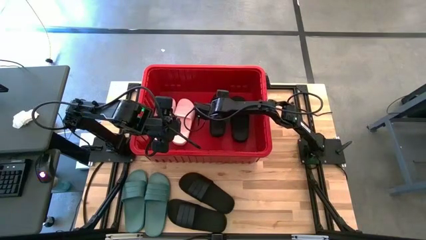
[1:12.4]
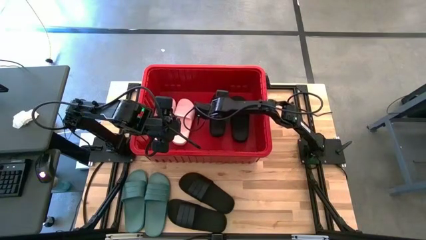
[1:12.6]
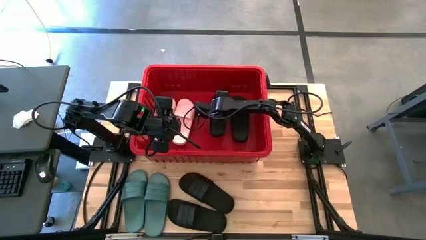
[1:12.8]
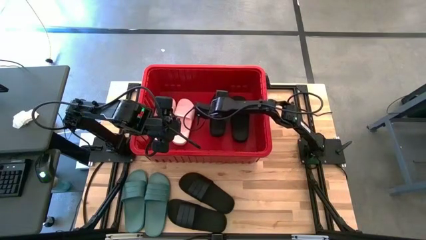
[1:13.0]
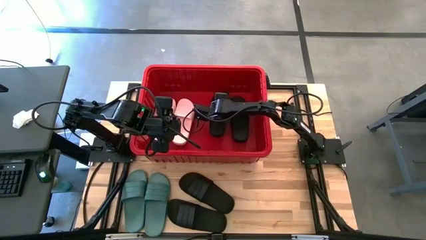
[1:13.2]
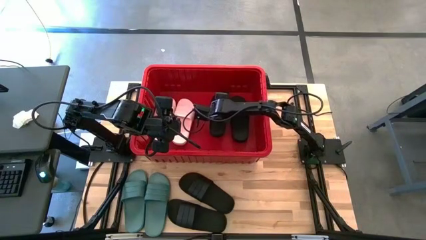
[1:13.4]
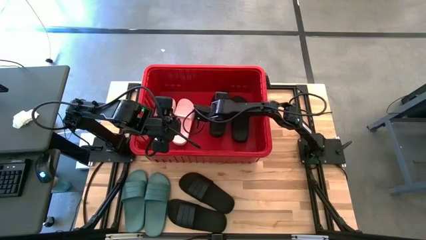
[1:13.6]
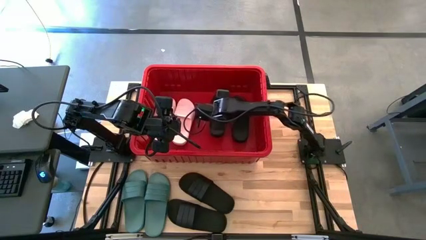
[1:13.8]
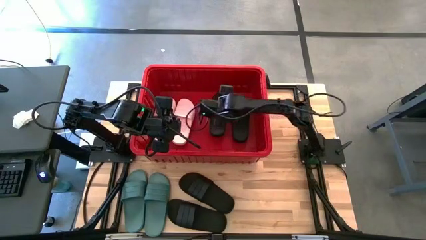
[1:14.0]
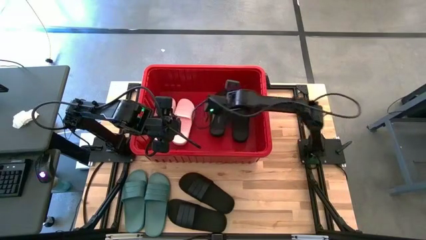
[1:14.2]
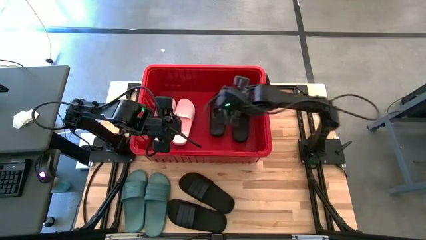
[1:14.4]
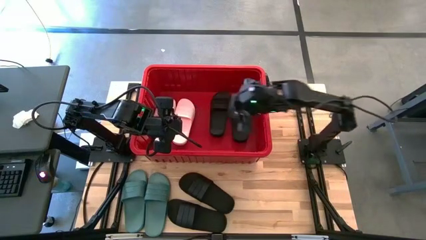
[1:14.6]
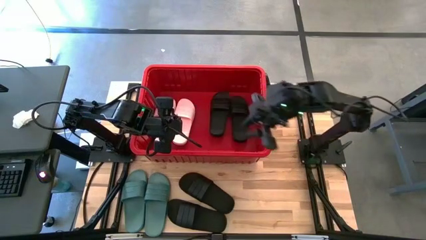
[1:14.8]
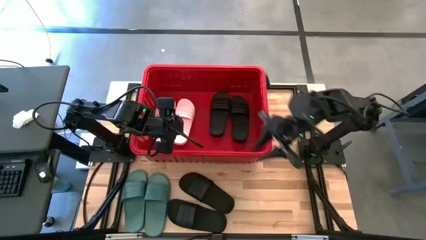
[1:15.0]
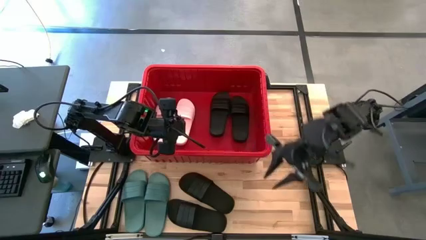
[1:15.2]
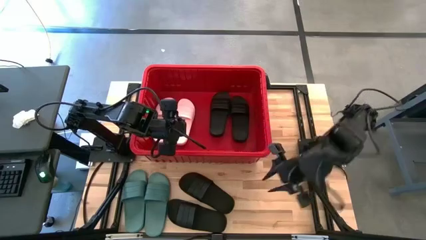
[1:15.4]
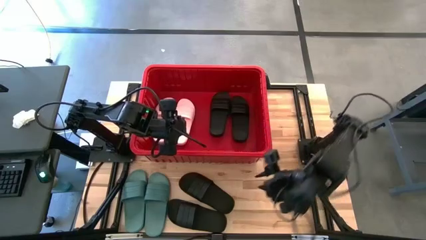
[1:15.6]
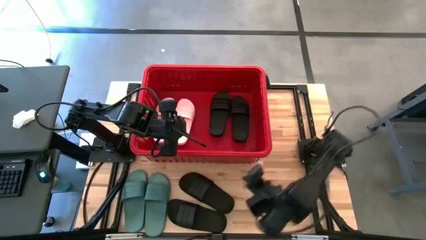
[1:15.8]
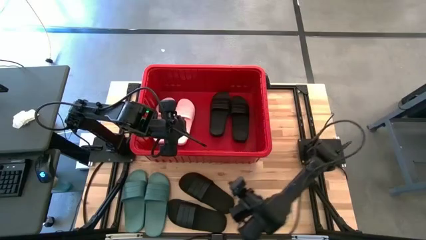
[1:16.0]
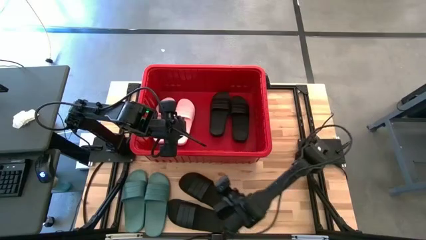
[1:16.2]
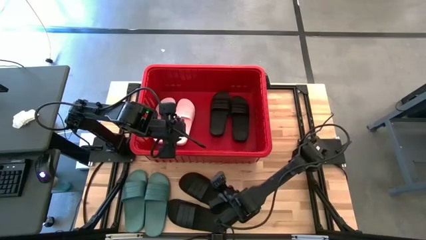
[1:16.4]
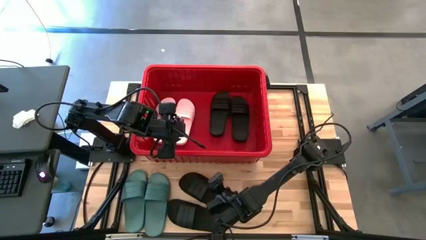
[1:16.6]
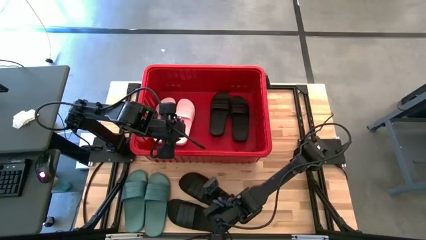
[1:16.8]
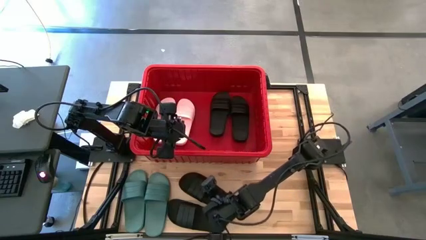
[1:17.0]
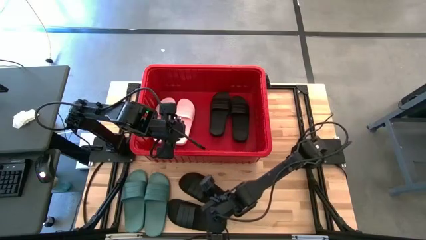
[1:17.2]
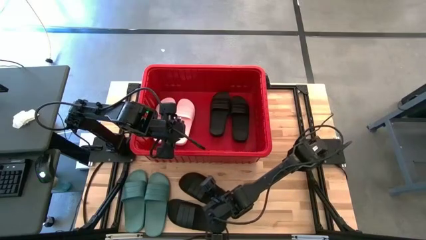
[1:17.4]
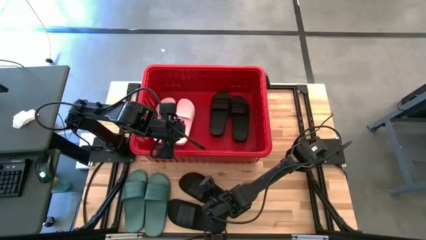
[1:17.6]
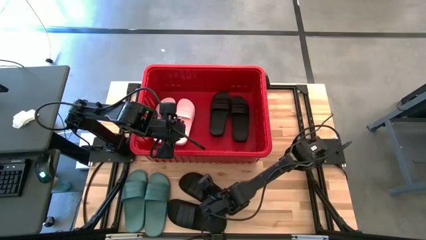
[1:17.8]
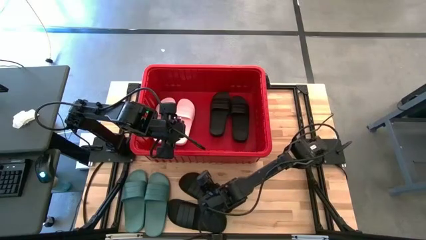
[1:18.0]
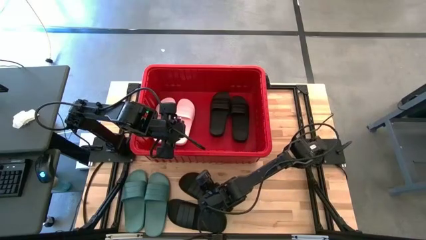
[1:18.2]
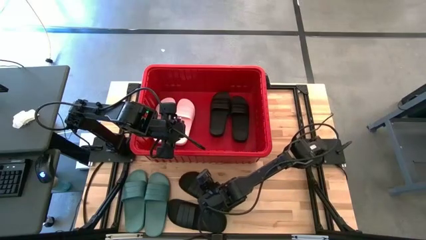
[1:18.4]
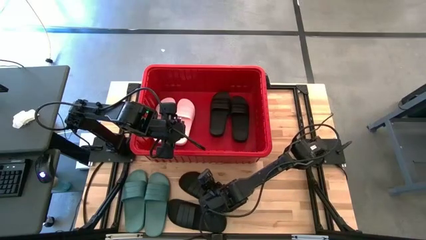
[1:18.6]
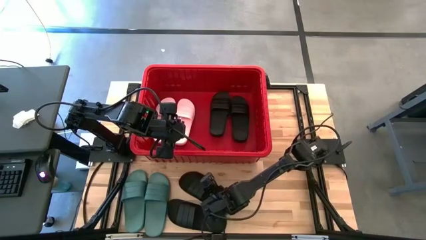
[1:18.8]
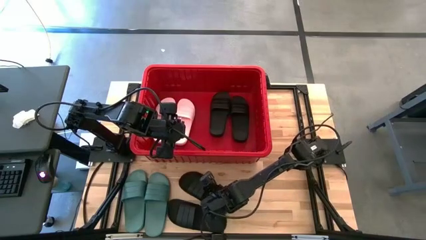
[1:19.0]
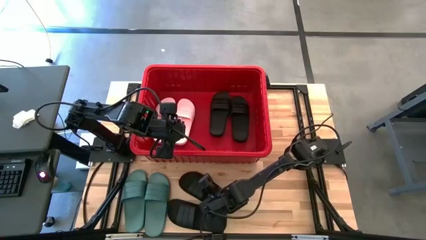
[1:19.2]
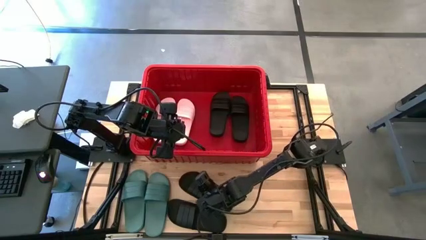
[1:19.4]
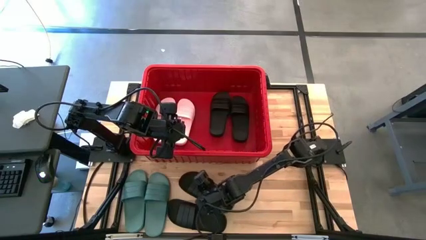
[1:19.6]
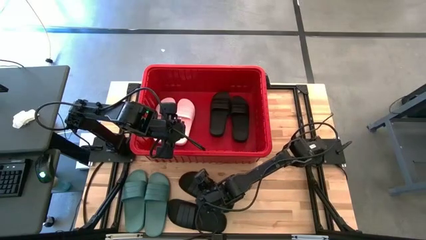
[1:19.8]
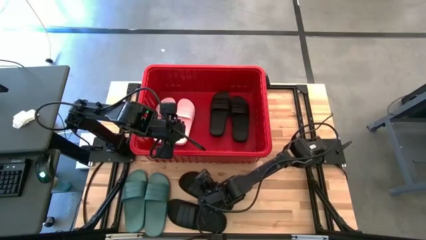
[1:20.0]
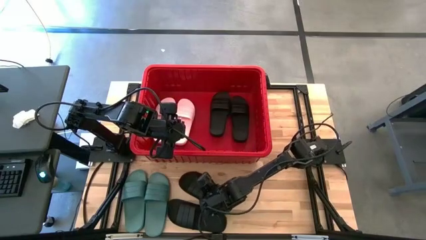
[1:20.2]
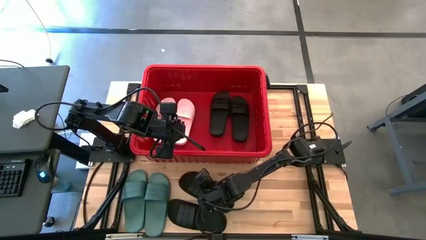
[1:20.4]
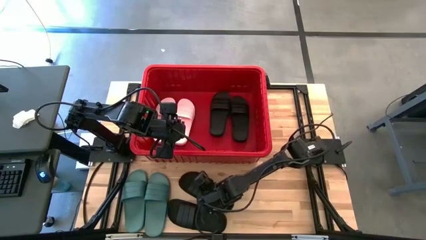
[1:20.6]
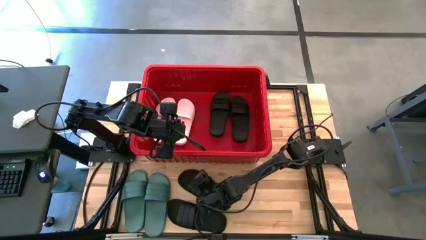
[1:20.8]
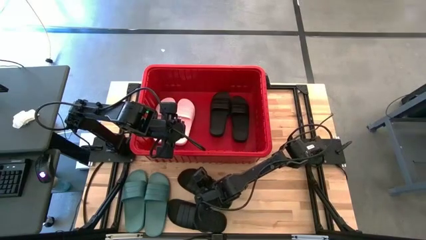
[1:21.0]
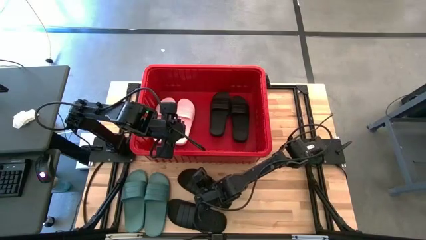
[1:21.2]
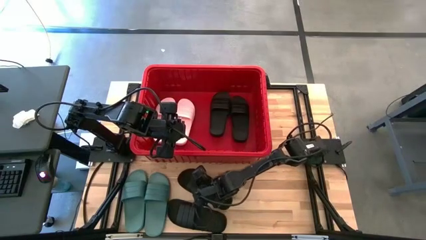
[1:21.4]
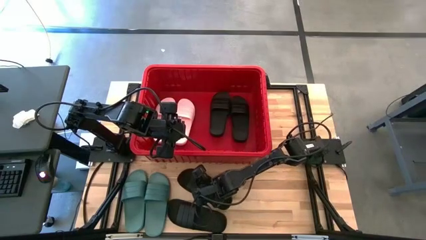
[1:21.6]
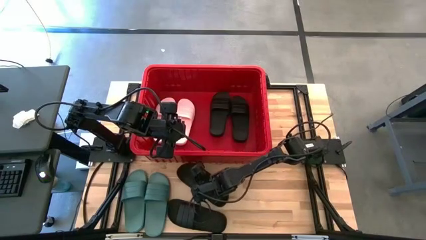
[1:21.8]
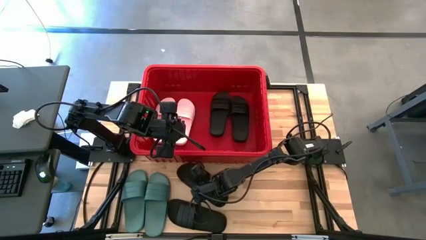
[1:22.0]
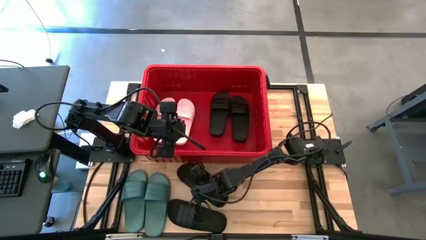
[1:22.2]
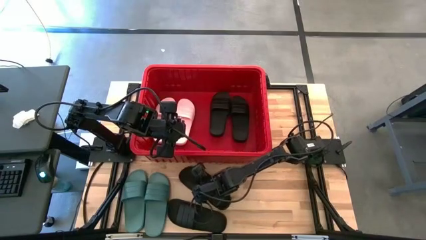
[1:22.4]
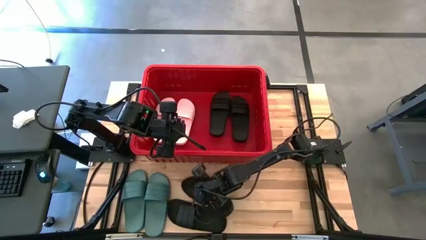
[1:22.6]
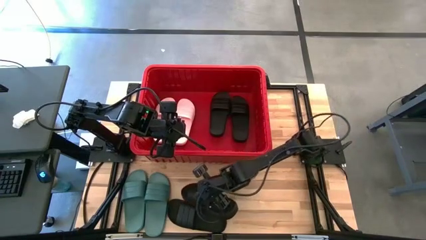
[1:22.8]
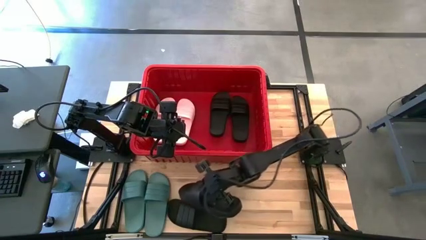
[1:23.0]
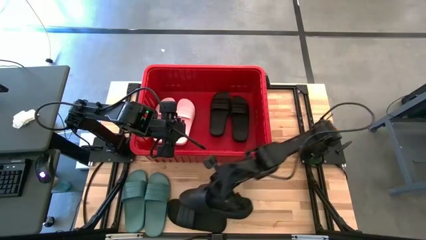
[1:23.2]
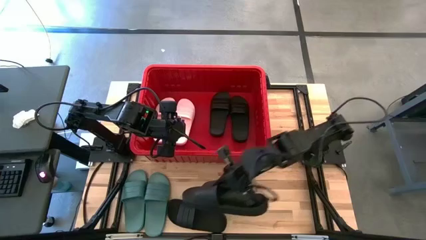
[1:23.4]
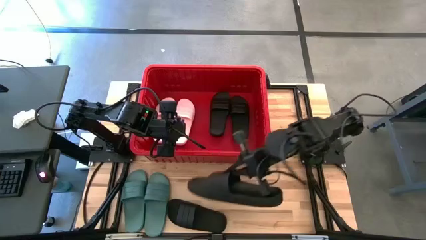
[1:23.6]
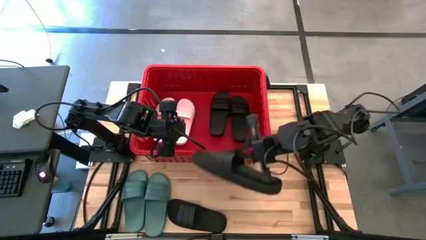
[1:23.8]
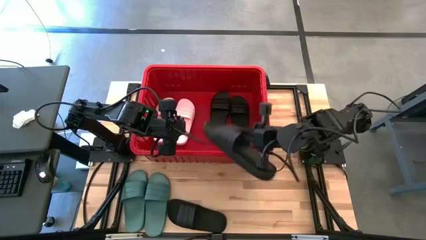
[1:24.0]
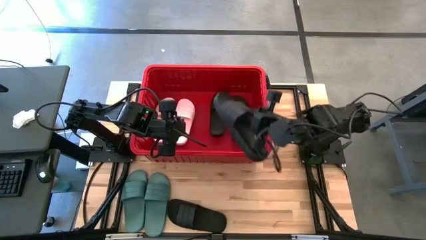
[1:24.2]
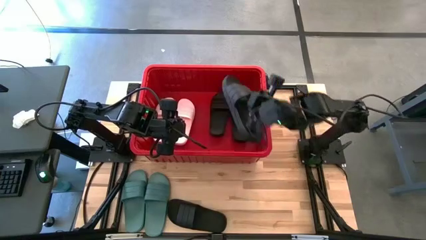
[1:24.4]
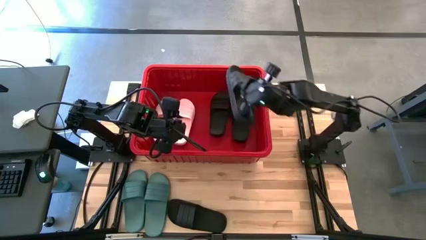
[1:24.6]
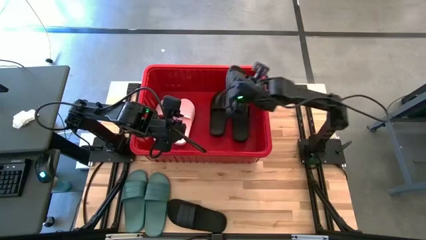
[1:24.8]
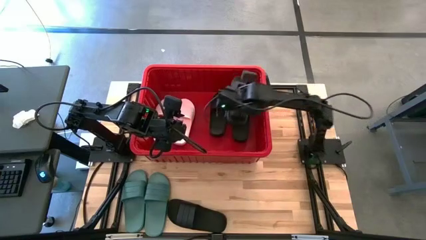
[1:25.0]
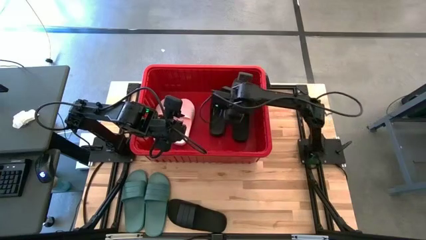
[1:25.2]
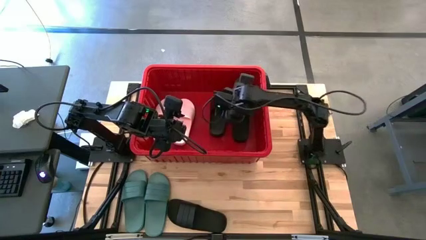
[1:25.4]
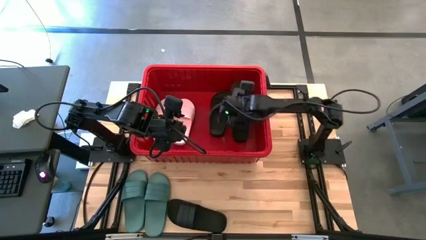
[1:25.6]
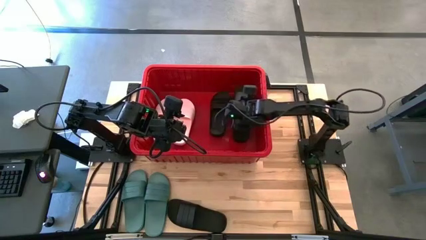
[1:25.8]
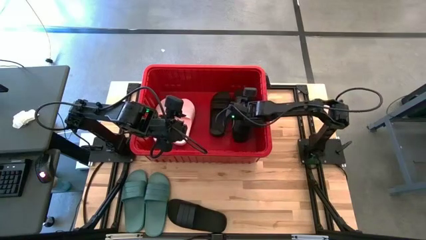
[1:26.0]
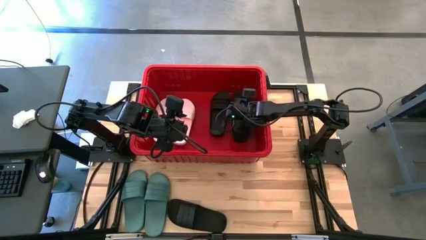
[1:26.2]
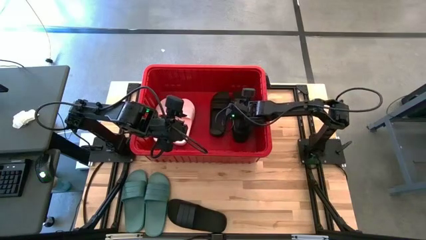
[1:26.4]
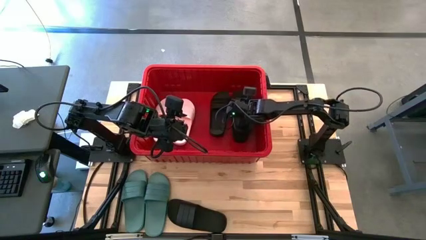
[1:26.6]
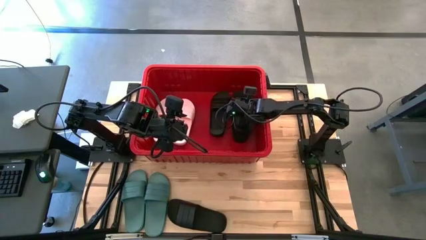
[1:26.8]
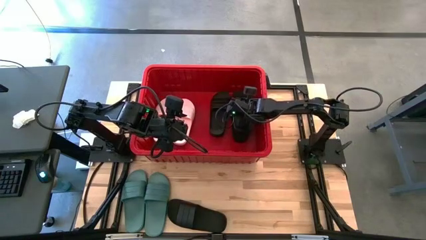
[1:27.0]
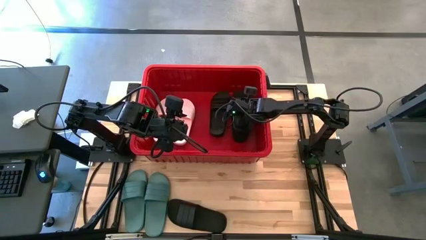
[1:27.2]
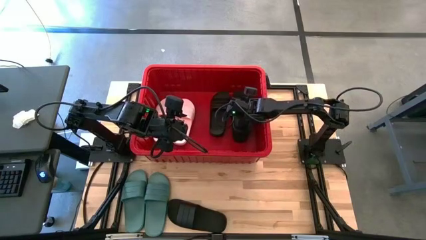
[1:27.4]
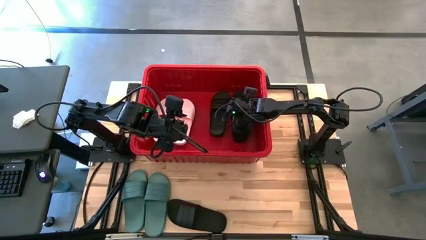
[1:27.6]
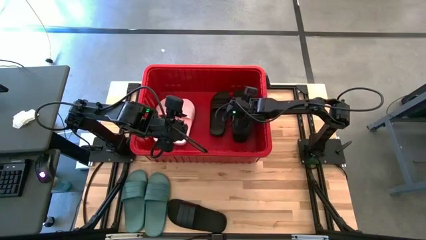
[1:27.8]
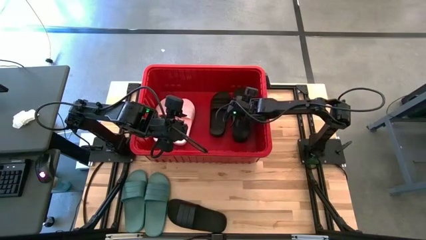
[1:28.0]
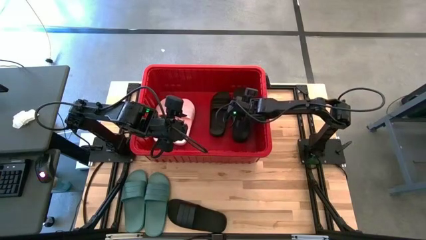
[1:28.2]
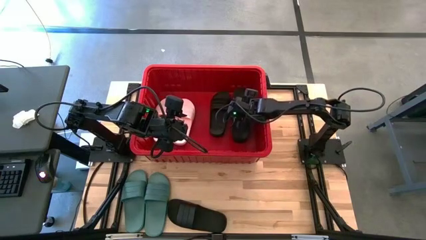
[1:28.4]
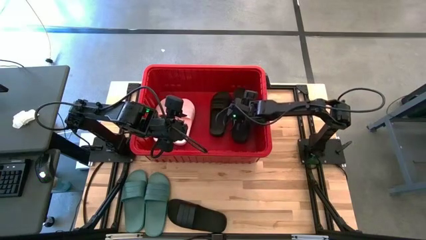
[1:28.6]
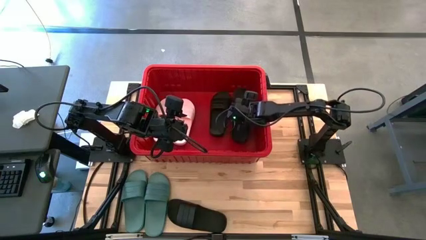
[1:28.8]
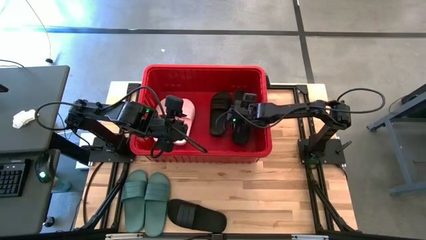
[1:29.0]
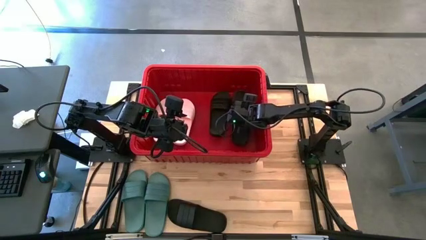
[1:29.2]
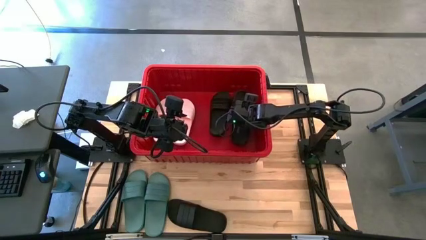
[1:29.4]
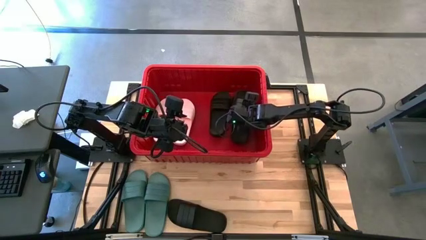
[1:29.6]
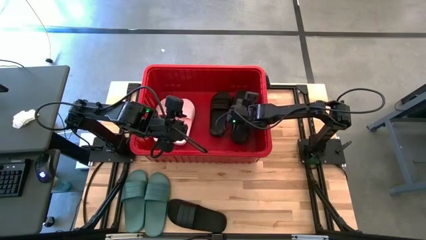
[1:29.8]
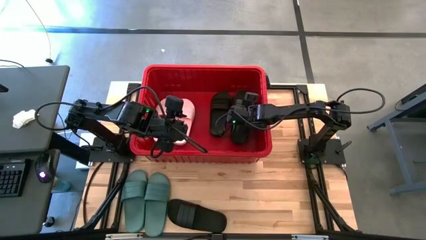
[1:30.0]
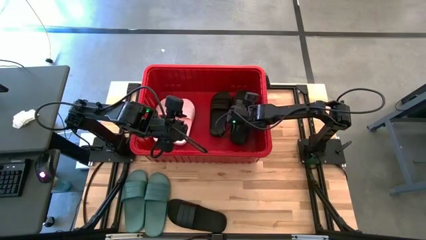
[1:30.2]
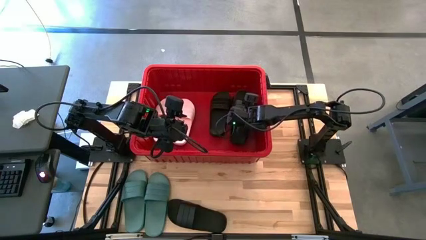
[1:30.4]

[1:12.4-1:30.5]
Task: Pick and place slides into bin
Put the black slide into the red bin

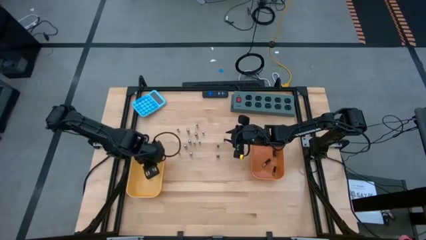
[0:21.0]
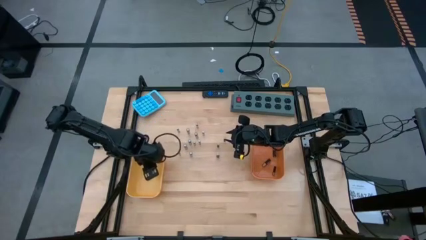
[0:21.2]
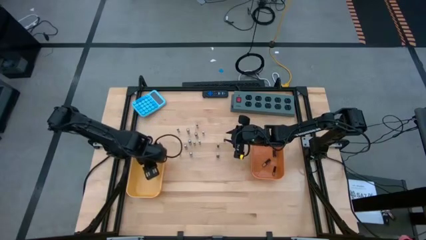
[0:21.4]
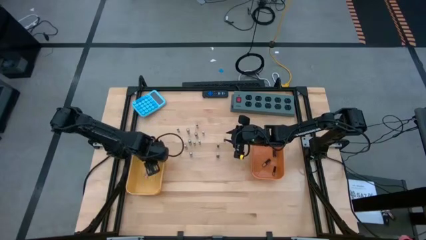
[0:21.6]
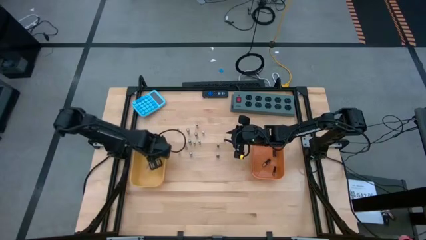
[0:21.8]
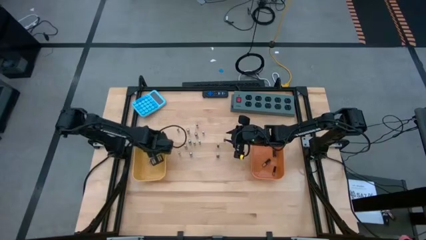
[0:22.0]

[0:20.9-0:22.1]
Task: Sort batteries
Adjust the yellow bin
